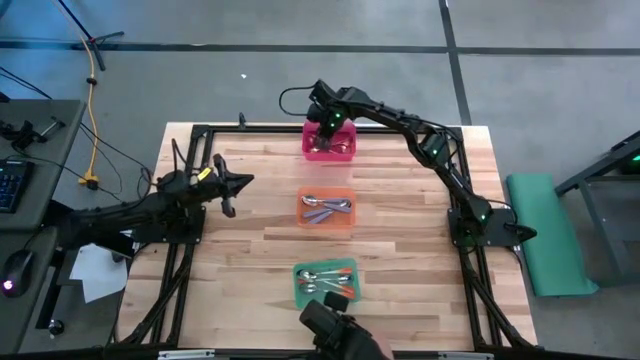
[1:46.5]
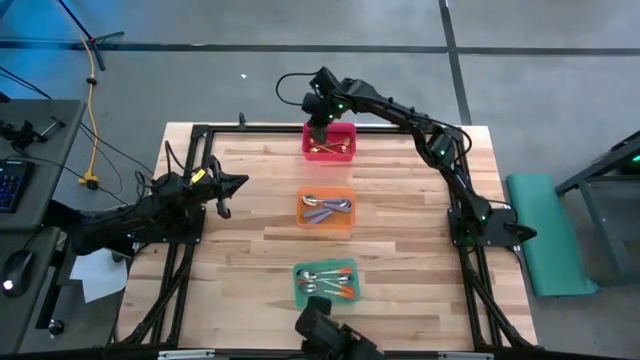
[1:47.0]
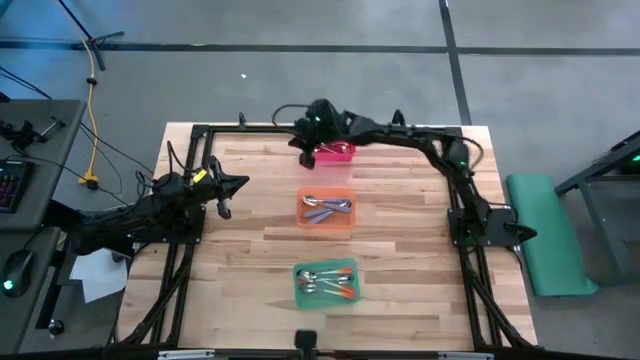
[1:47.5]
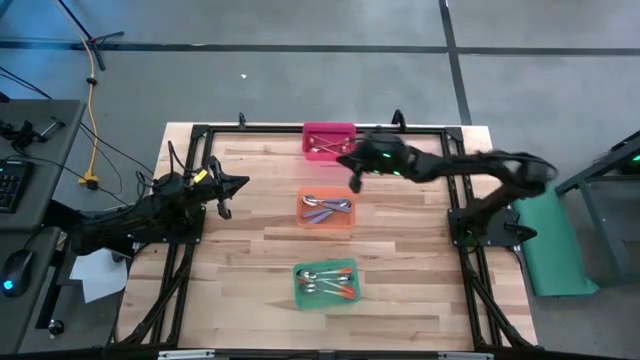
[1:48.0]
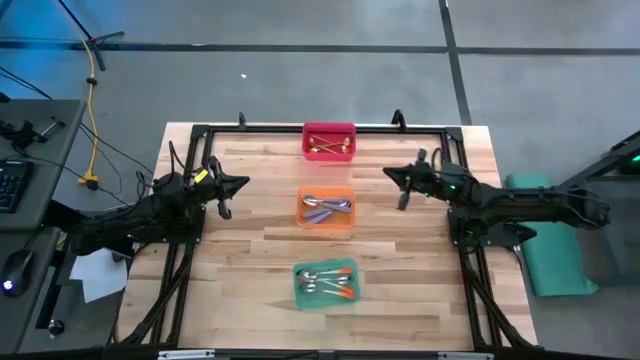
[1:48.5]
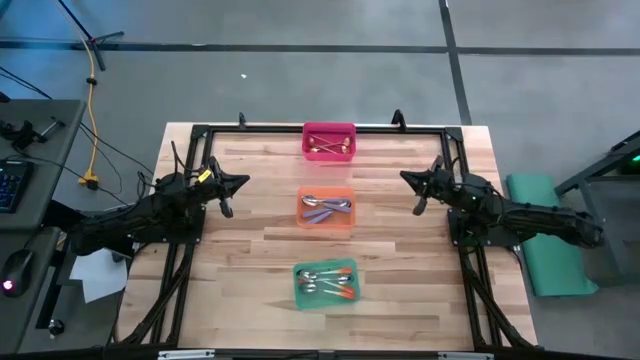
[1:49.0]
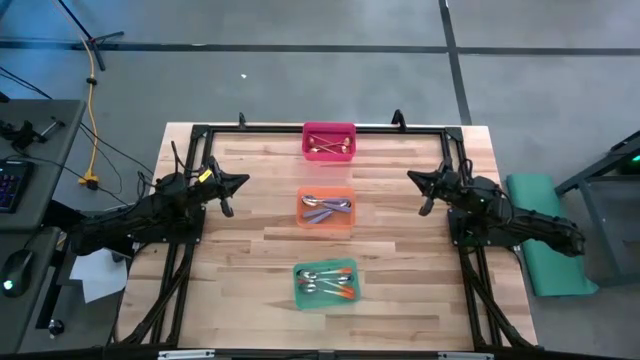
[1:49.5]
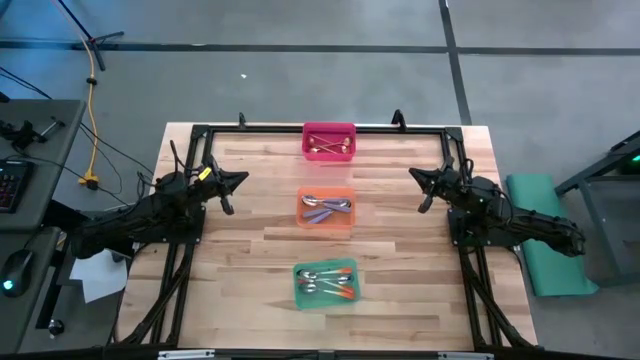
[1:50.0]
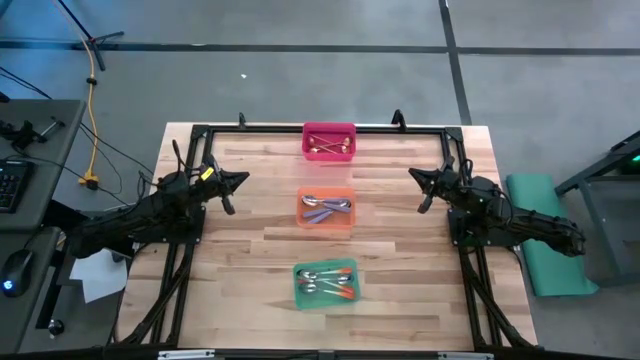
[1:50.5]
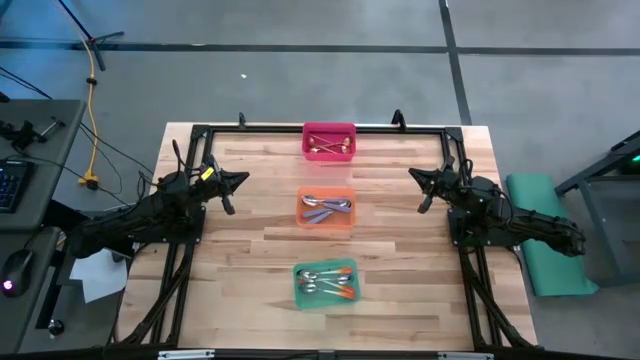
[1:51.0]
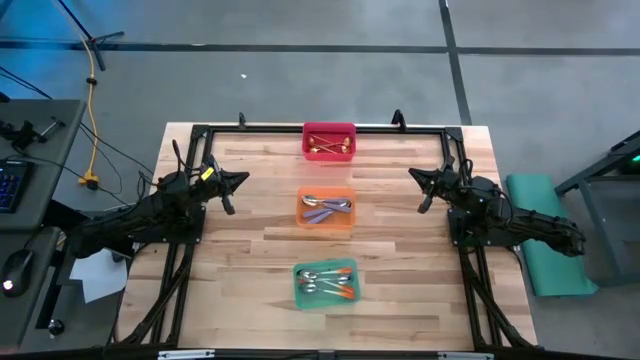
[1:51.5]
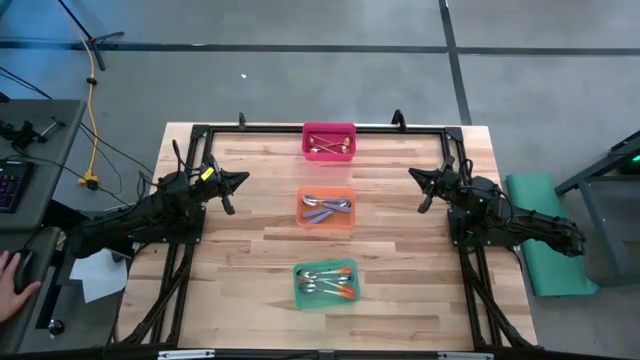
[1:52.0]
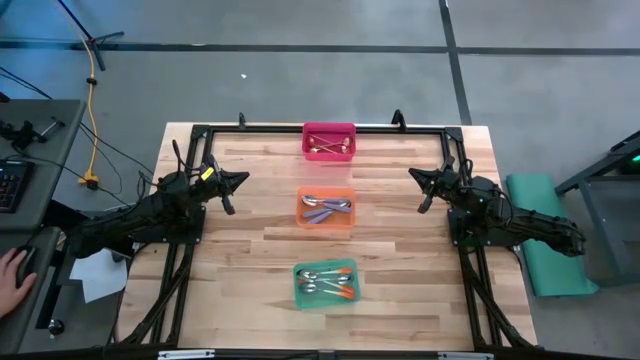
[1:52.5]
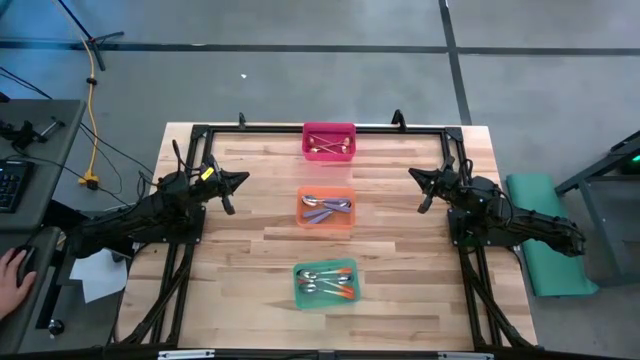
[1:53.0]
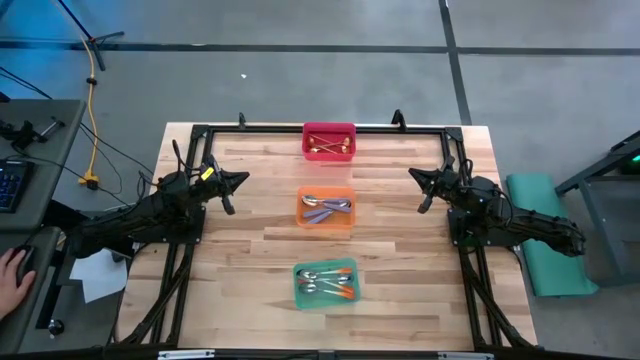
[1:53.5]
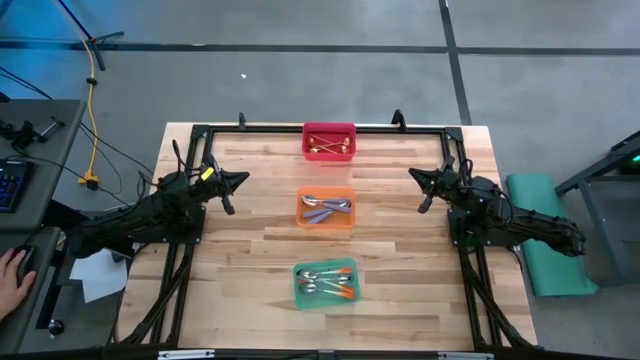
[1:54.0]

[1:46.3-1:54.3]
Task: Sort silverware by color (type)
Return to Home Position

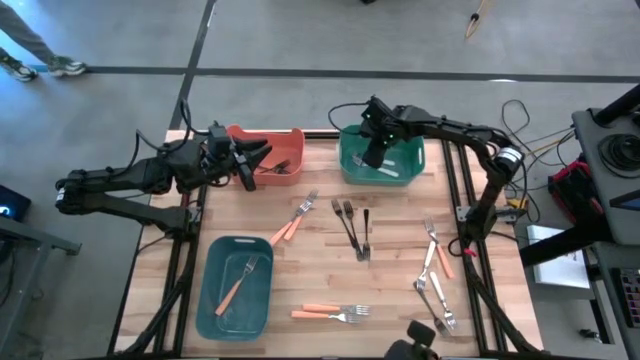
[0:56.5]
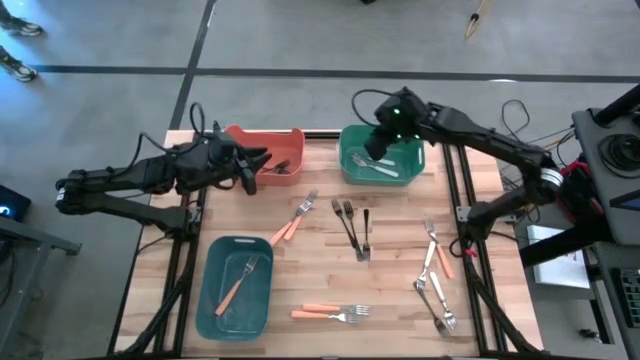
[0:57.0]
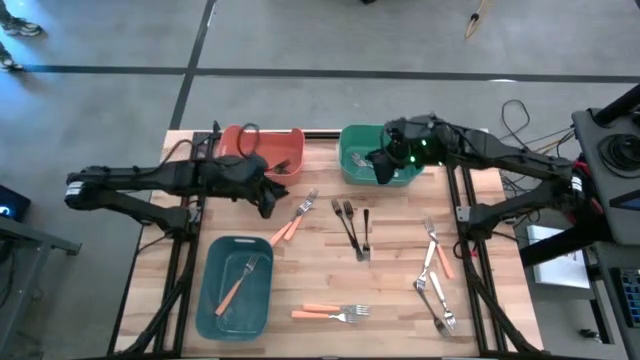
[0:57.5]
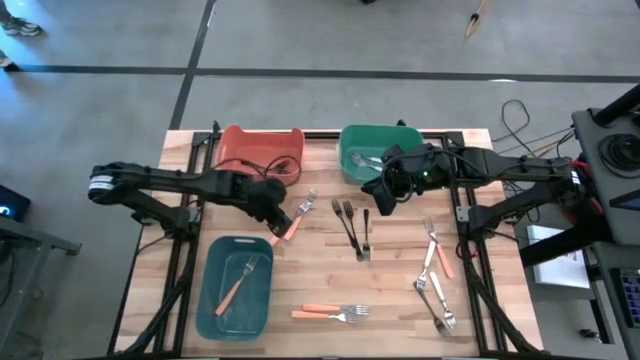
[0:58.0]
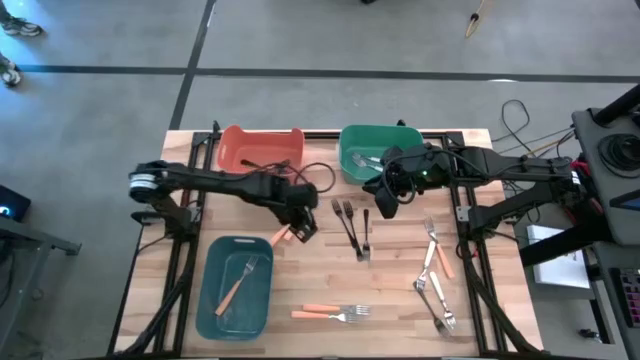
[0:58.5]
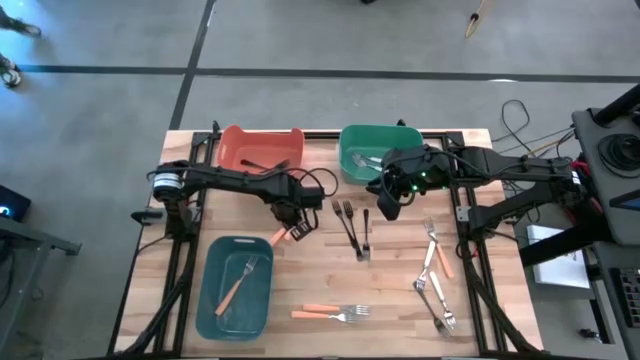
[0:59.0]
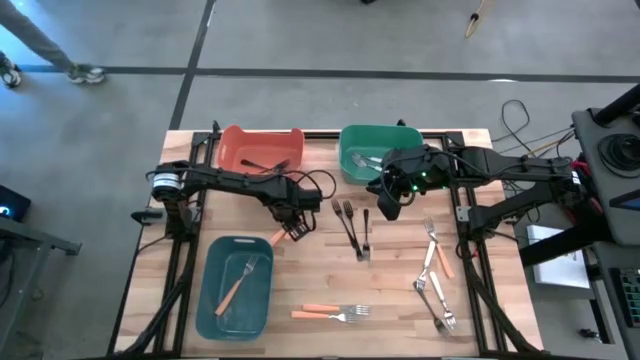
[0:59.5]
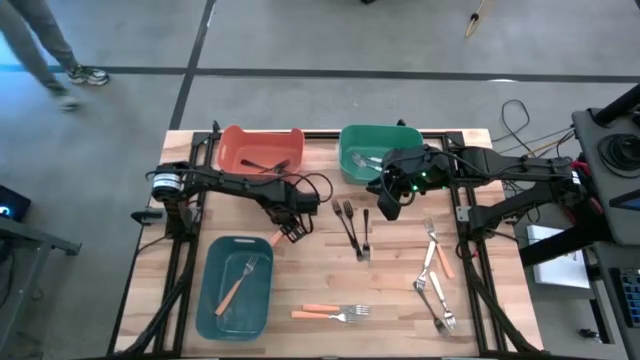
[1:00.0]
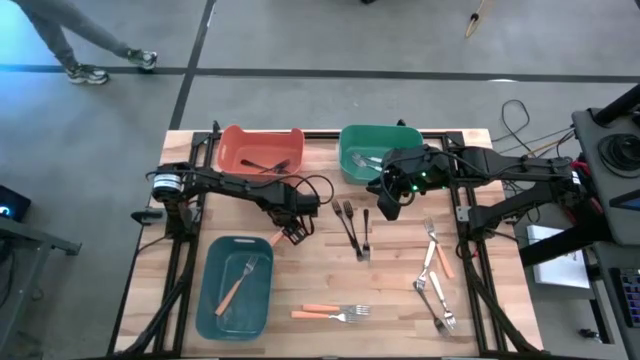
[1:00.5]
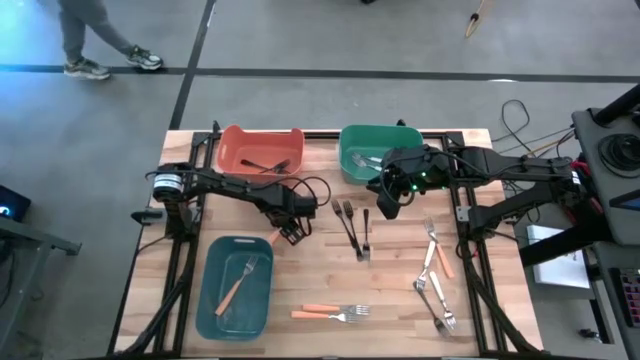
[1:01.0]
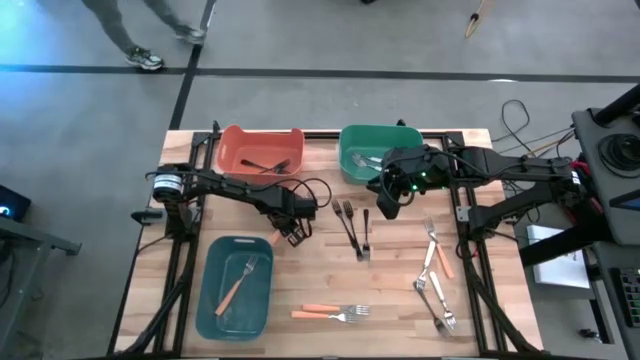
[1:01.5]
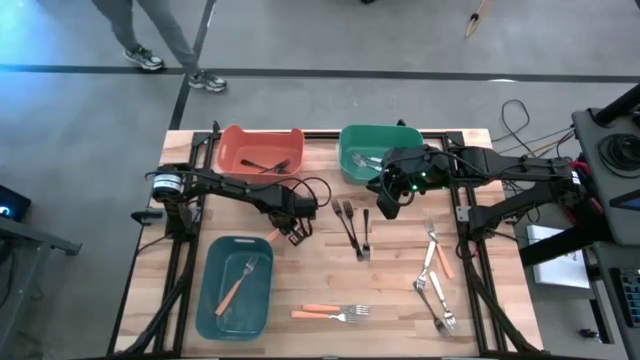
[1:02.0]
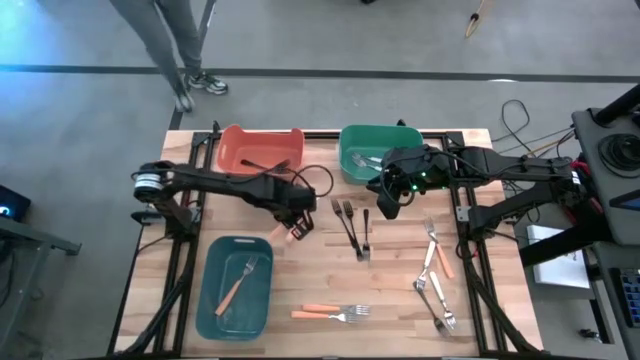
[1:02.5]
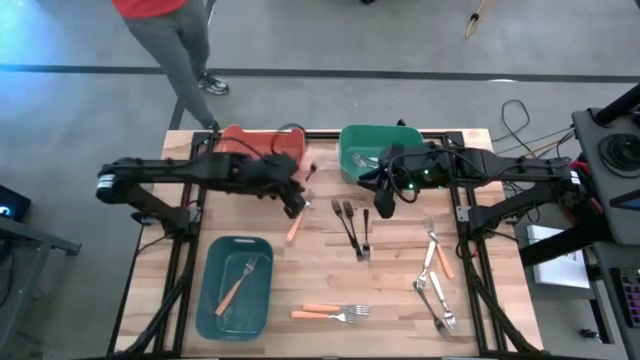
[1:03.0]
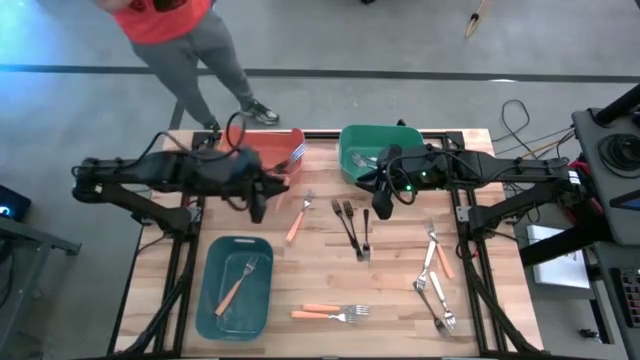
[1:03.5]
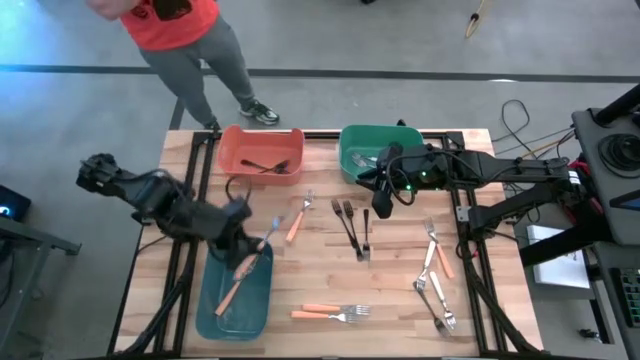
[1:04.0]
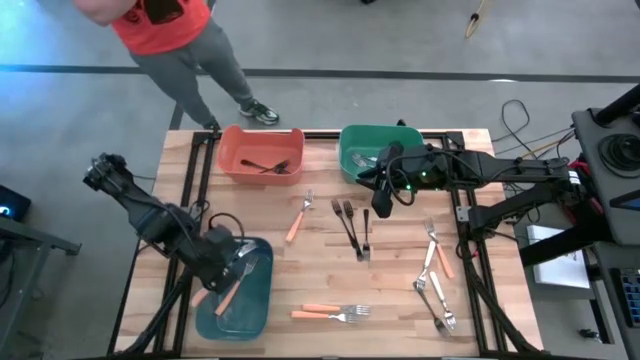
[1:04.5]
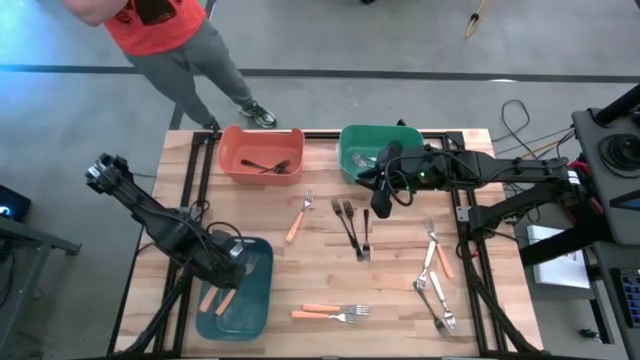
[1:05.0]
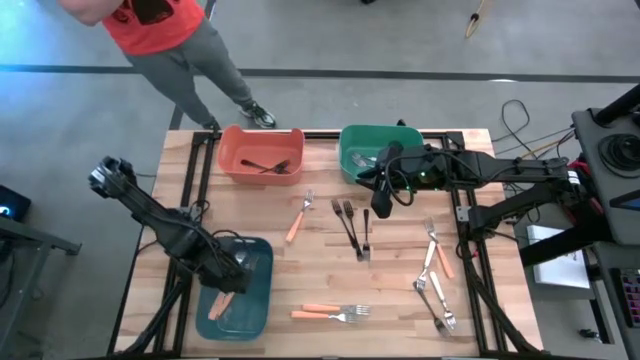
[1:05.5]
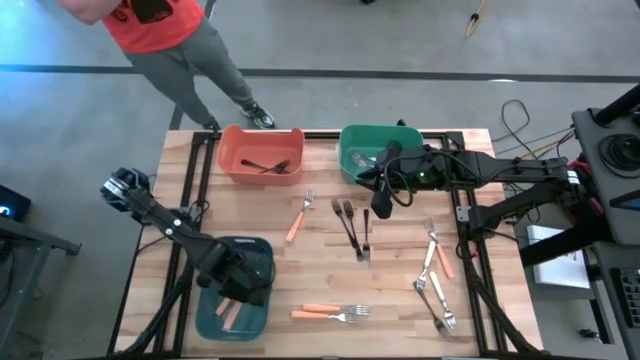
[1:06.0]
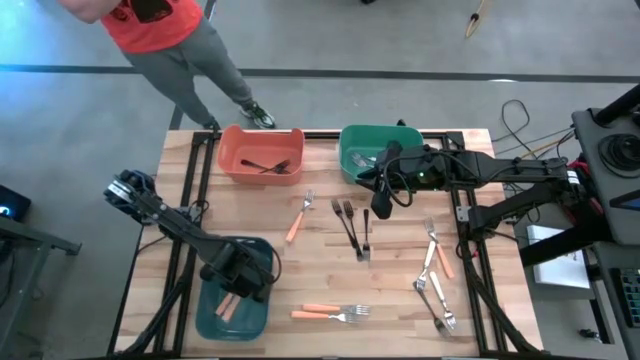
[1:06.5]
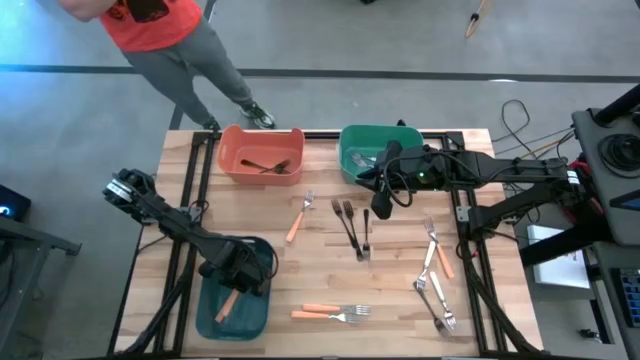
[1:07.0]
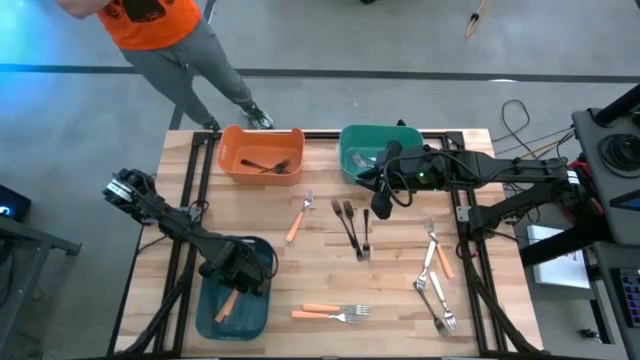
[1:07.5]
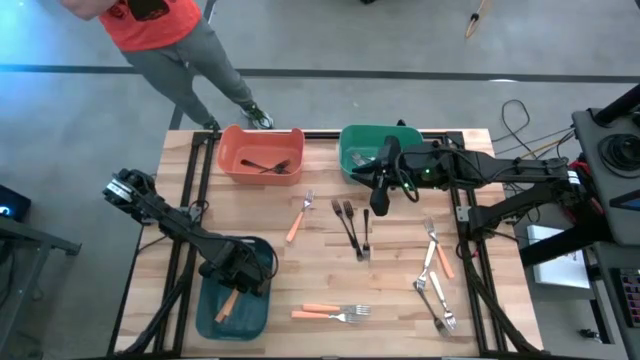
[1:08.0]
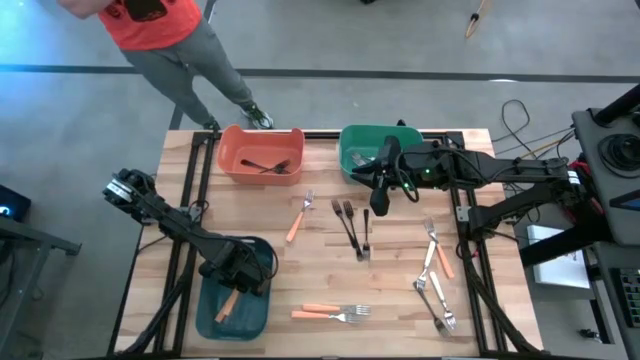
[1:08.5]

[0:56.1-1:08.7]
Task: Sort silverware by color (type)
Put the orange fork into the blue-green bin
